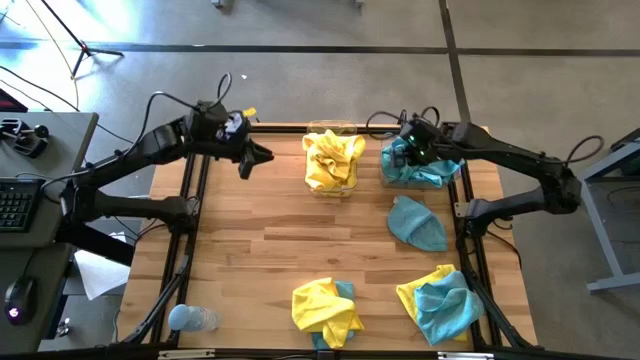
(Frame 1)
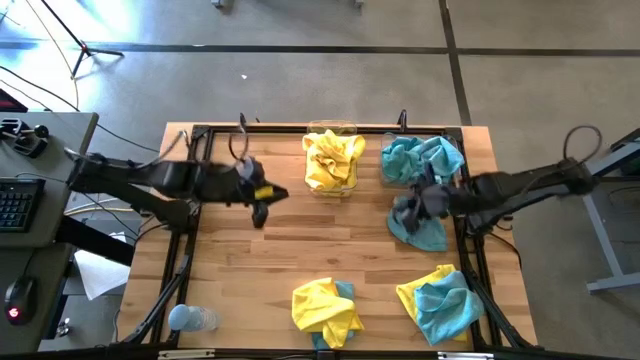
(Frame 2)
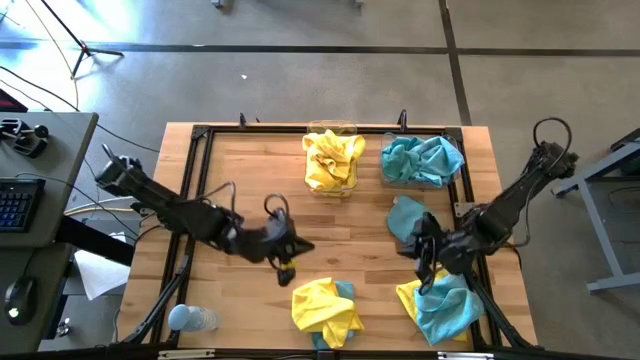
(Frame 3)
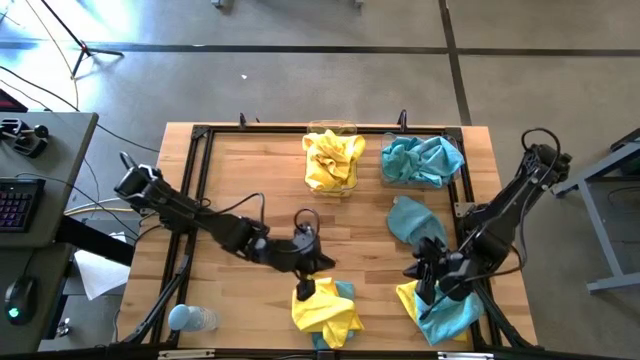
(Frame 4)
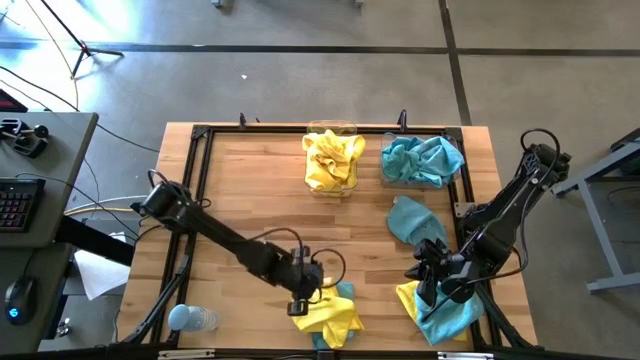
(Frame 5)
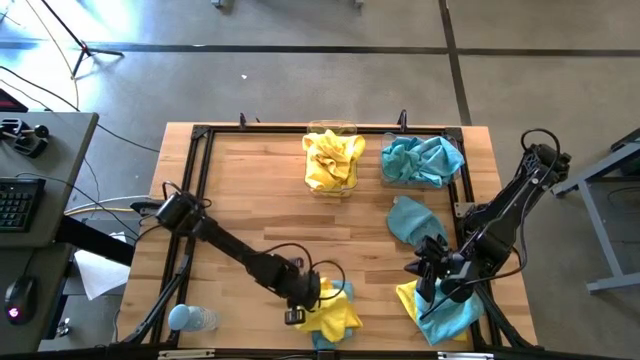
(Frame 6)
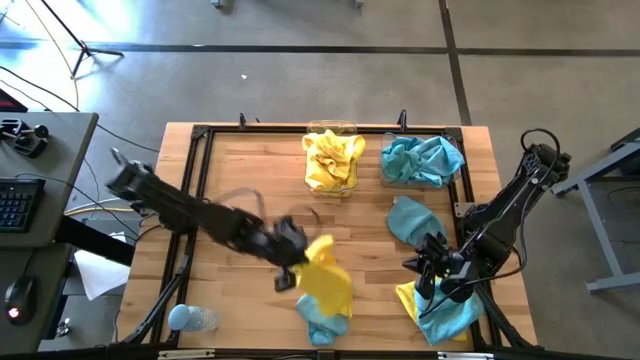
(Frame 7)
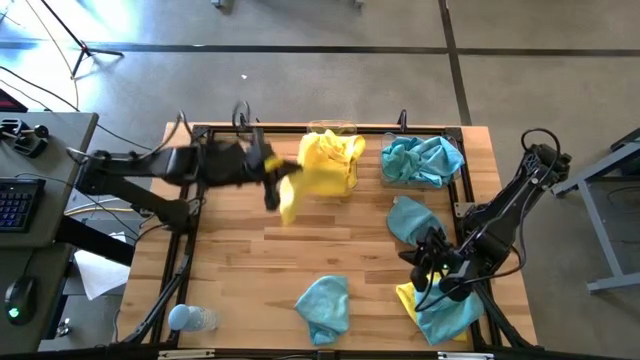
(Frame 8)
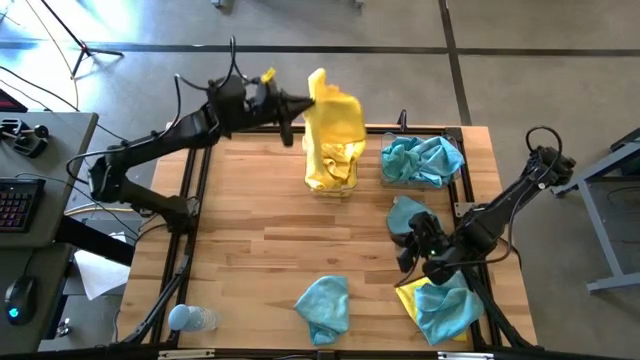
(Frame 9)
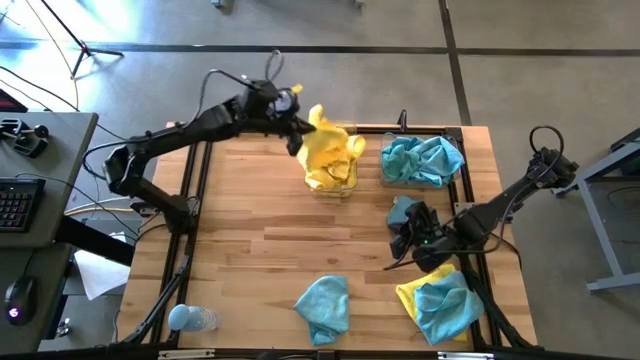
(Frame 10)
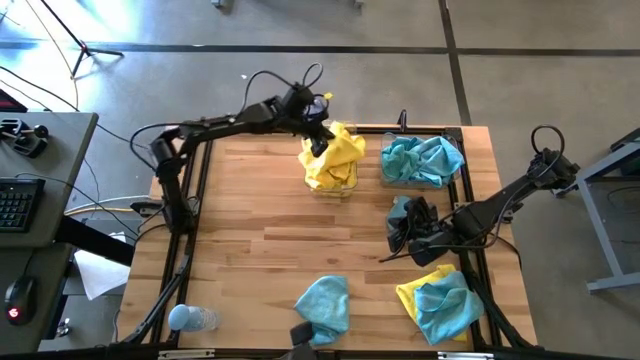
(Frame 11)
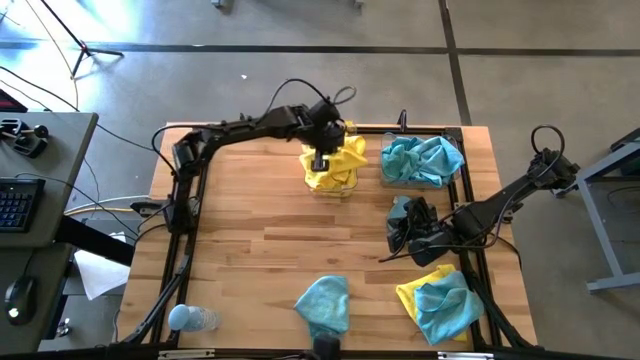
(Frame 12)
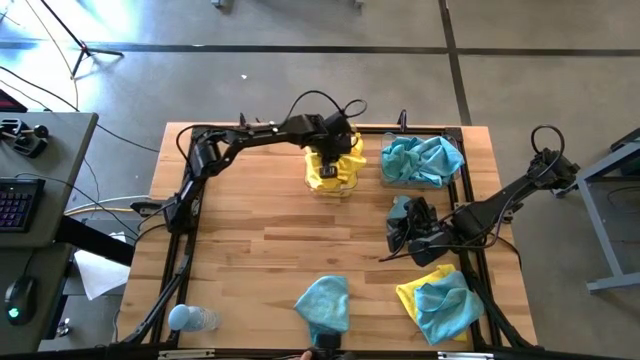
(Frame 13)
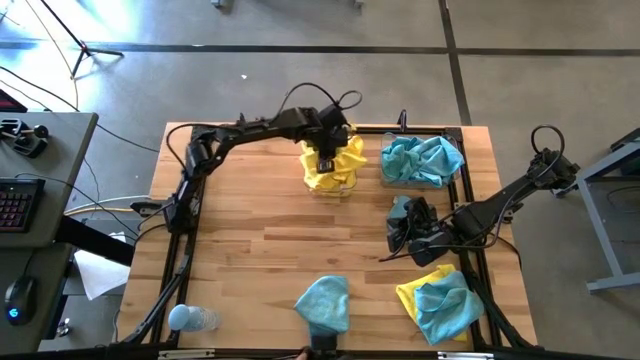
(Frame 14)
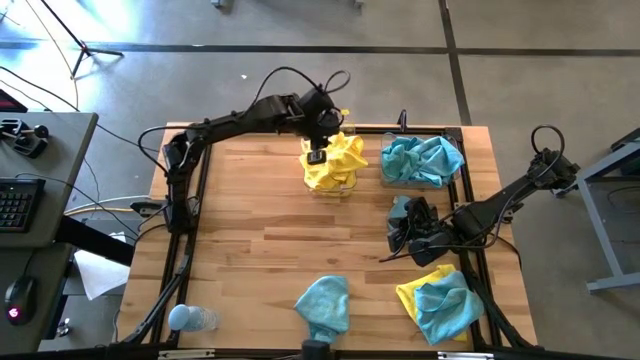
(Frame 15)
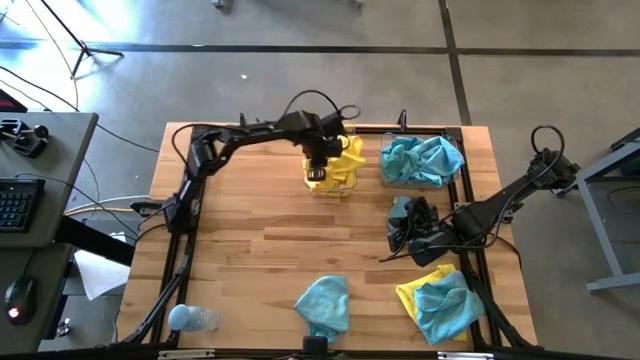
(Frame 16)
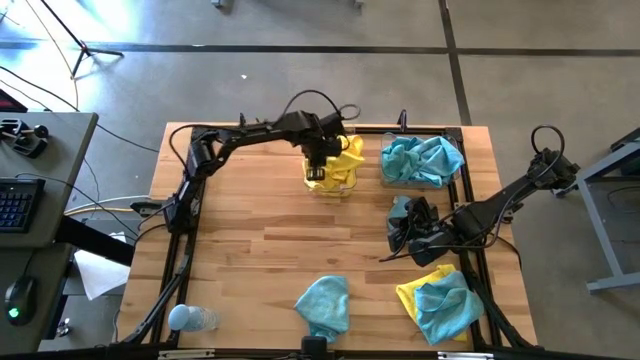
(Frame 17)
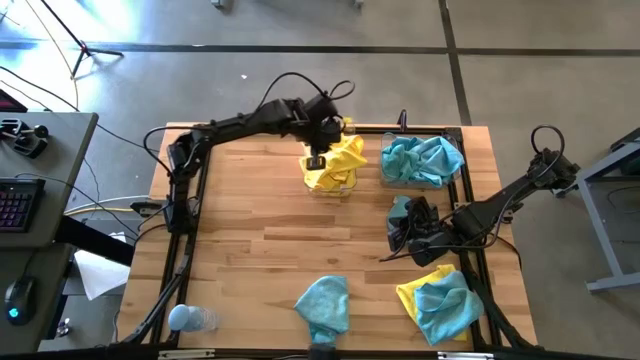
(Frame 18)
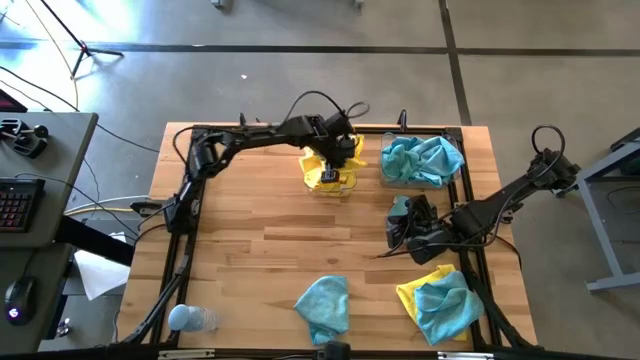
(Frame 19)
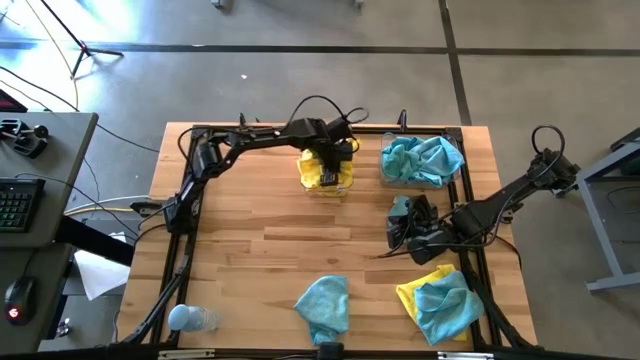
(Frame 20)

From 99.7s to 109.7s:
Task: Sort microfiber towel by color & place in baskets
Put the yellow towel into the left transparent bin

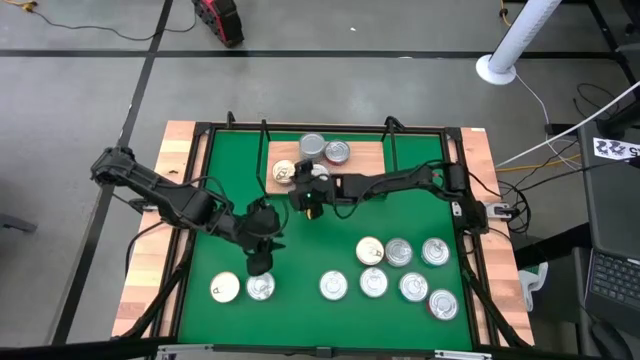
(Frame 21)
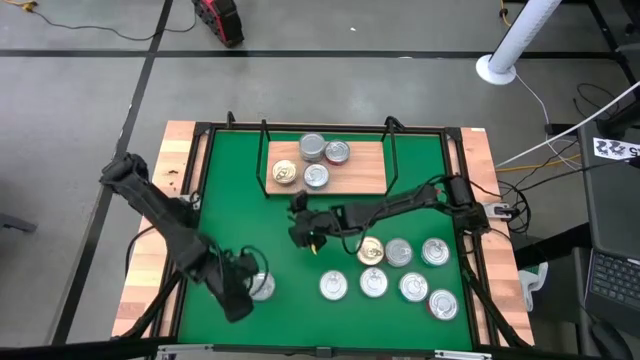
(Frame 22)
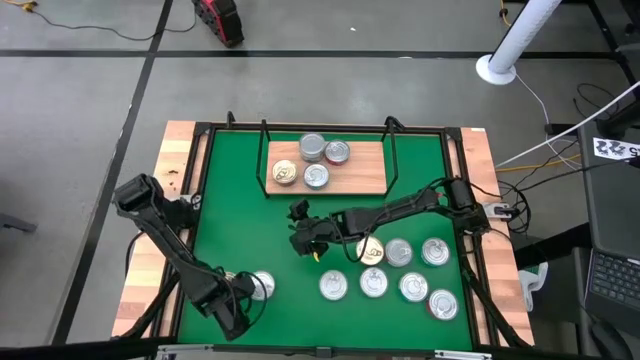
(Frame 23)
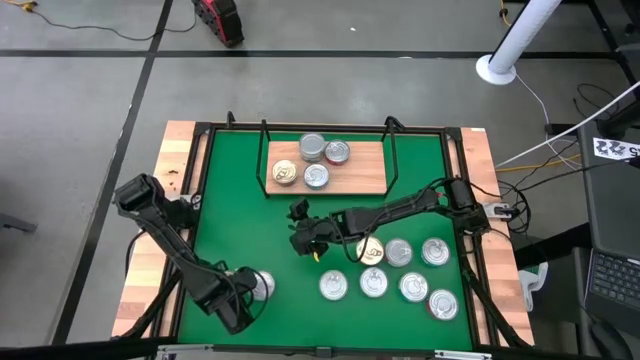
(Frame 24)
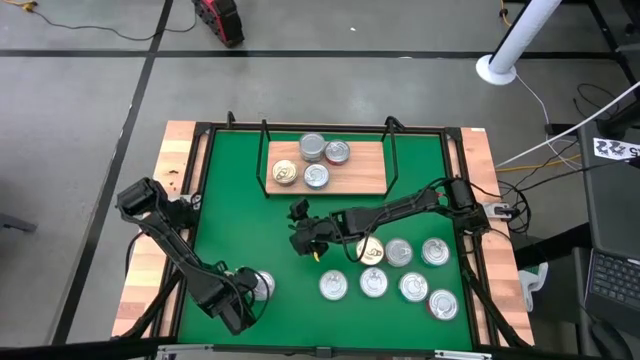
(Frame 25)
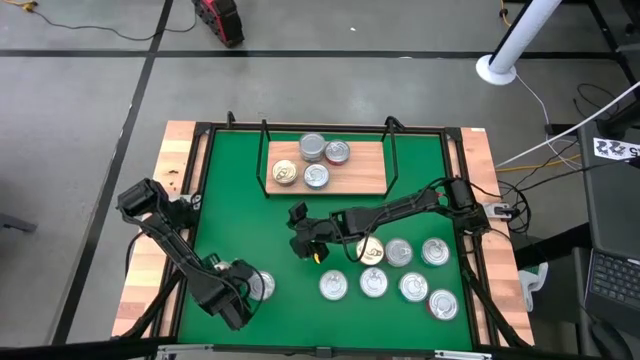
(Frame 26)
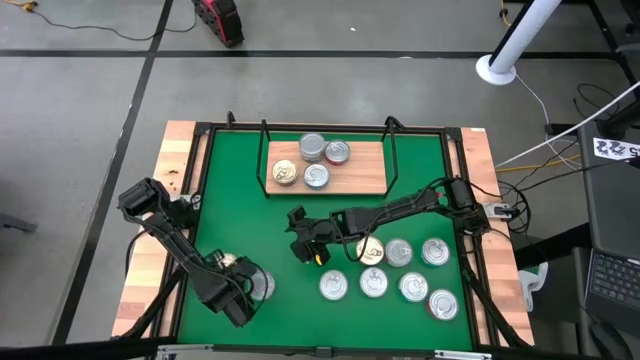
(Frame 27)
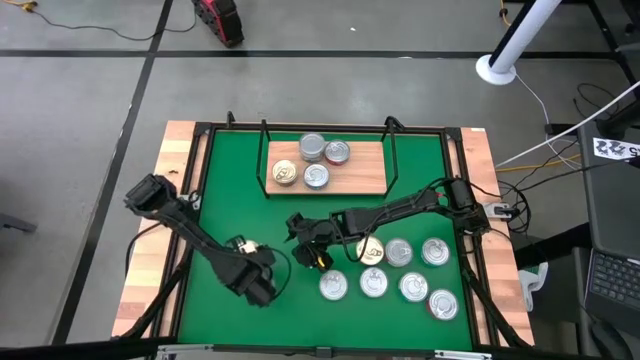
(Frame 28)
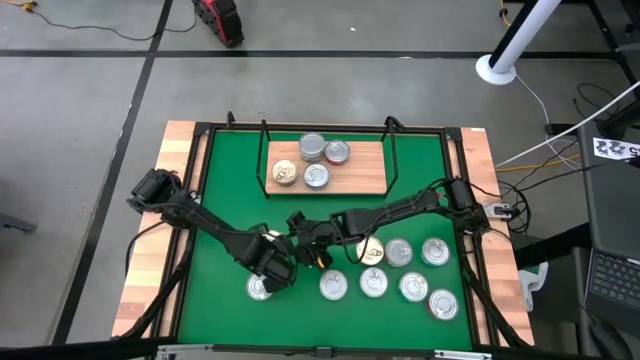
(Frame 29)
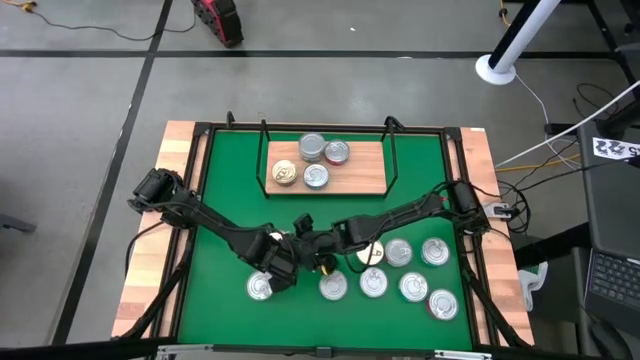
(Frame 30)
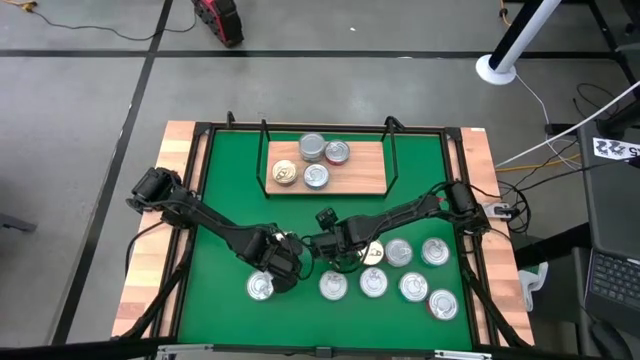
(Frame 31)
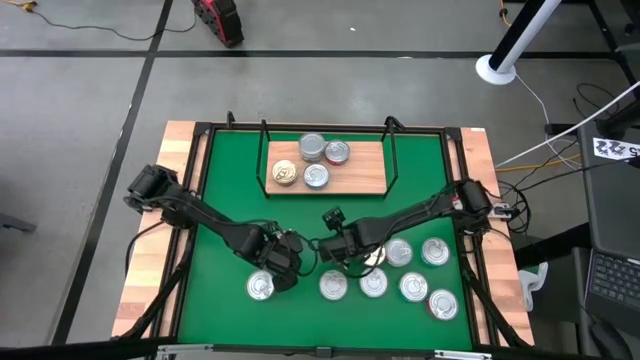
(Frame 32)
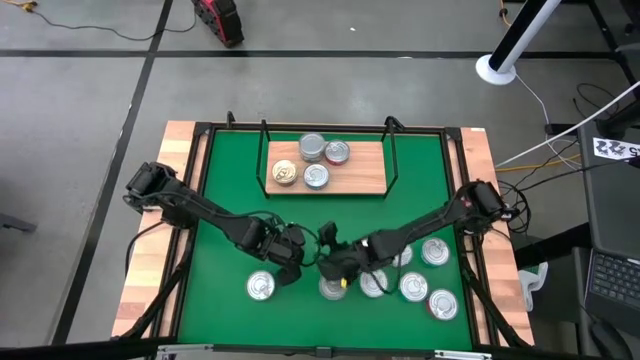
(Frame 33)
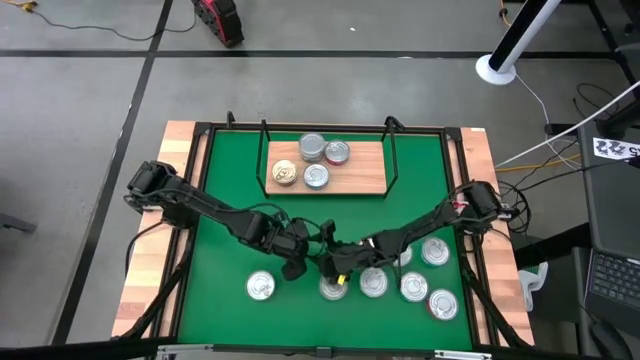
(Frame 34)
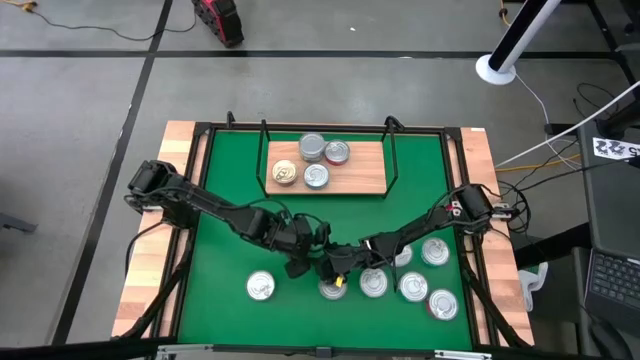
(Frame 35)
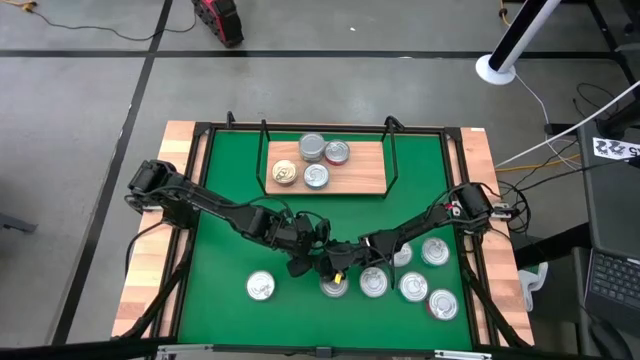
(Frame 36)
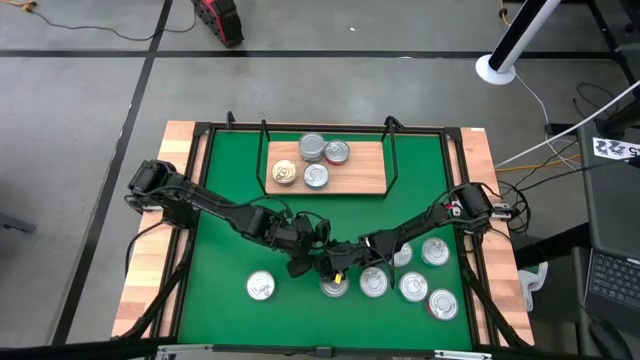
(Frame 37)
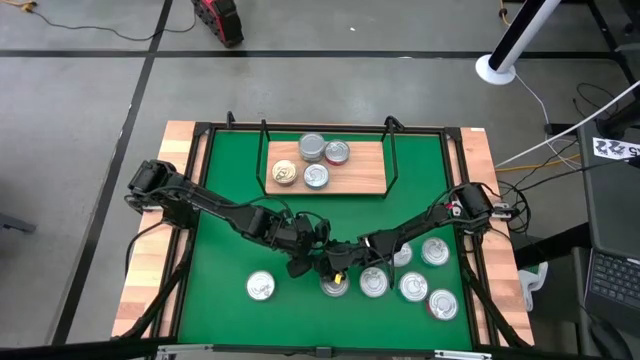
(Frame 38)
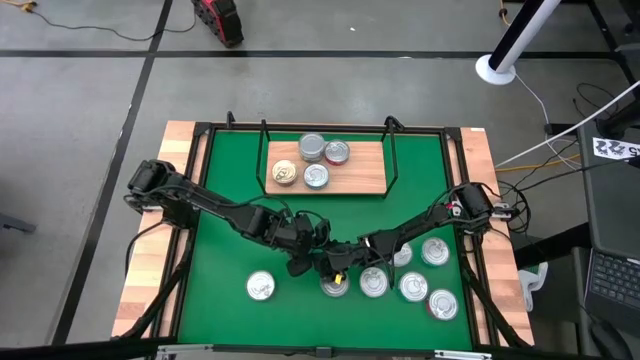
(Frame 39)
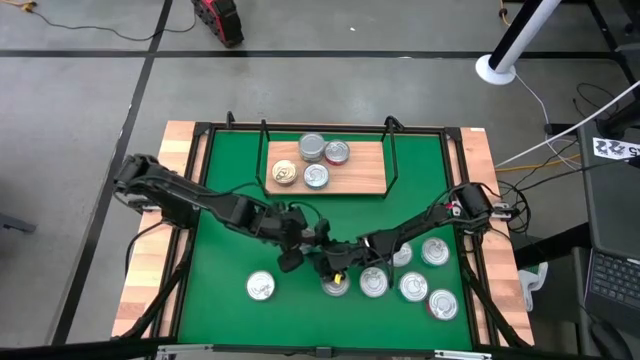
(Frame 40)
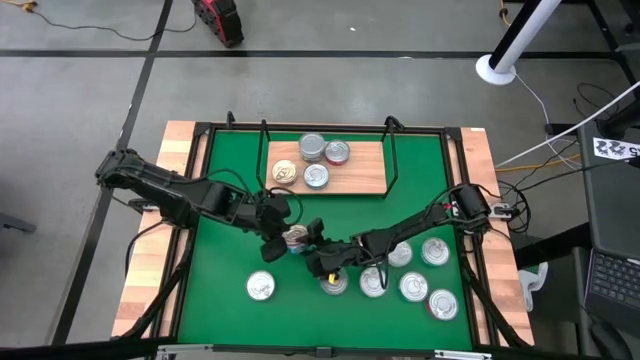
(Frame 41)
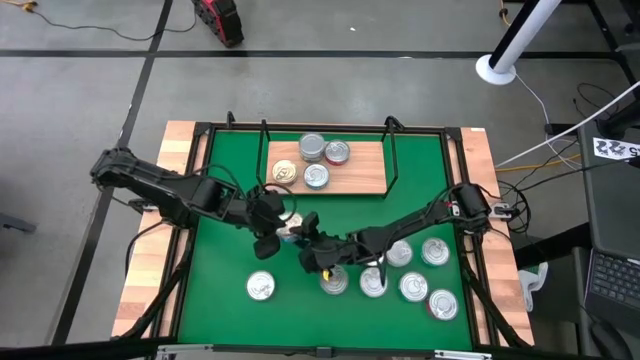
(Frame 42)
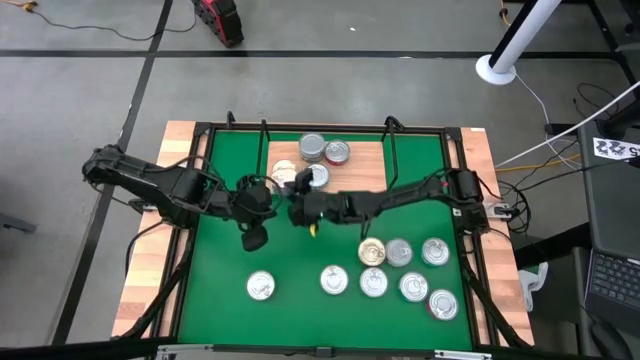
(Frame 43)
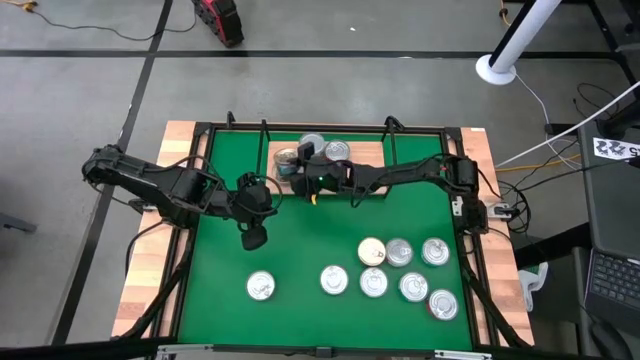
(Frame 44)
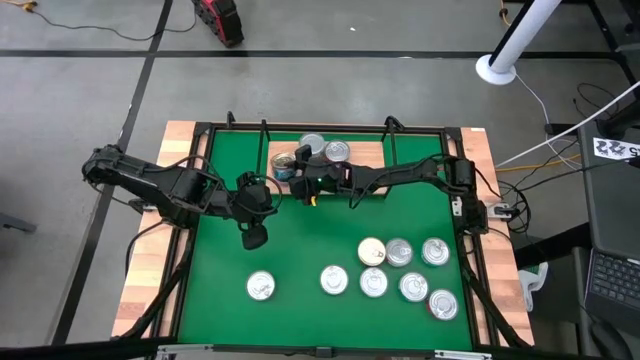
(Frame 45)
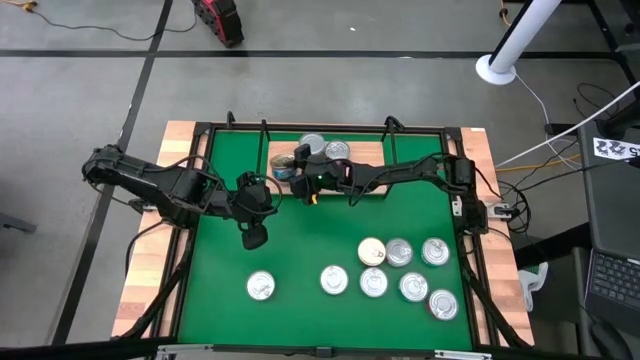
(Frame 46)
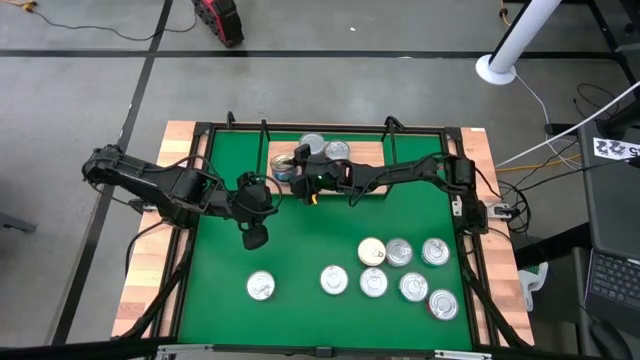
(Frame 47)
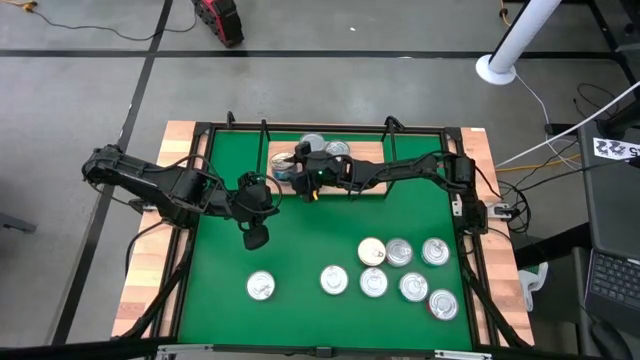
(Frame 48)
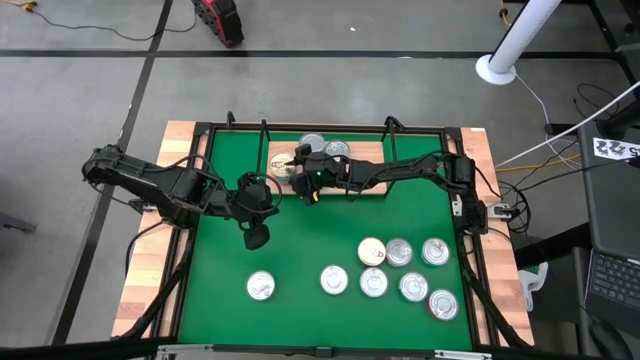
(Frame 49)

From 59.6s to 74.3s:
Task: Stack canned seafood by type on shelf
Stack the blue pink tuna can on top of the other blue pink tuna can on the shelf
